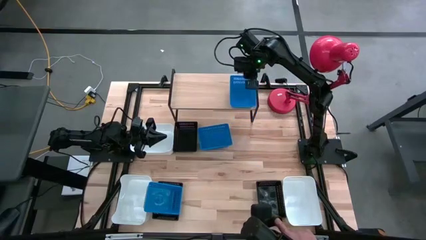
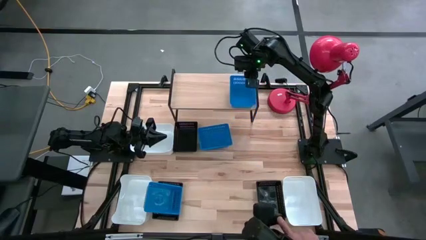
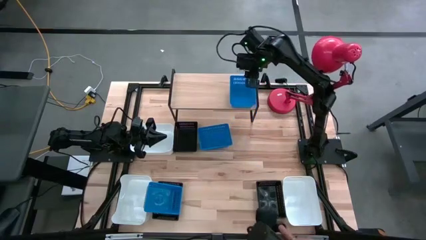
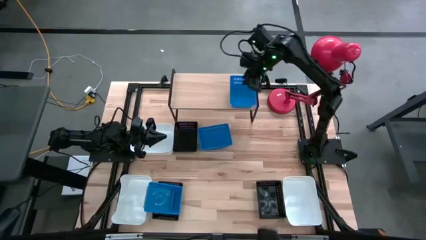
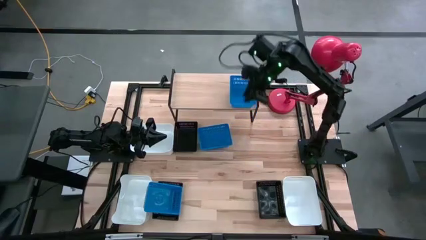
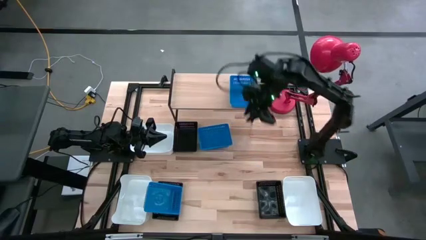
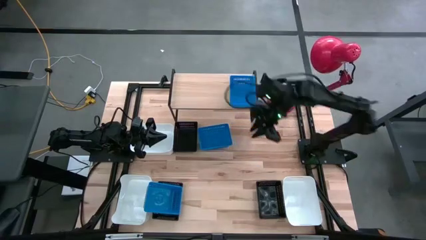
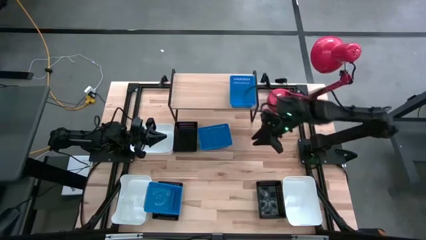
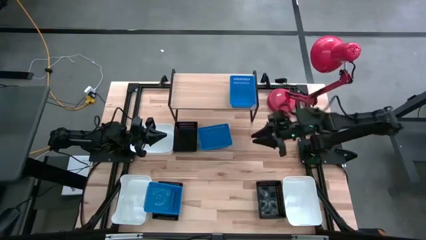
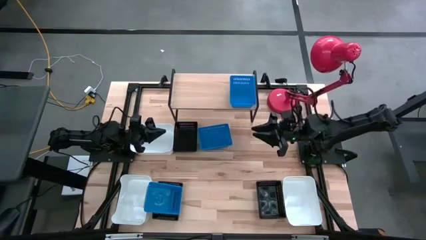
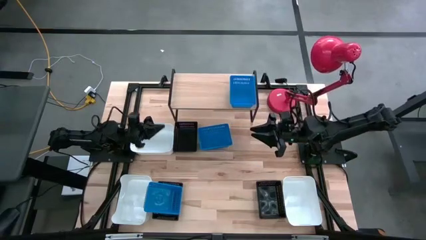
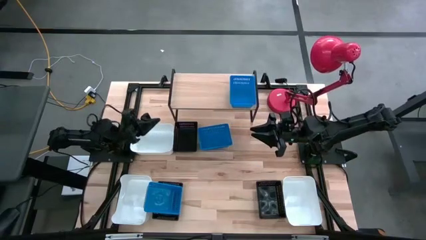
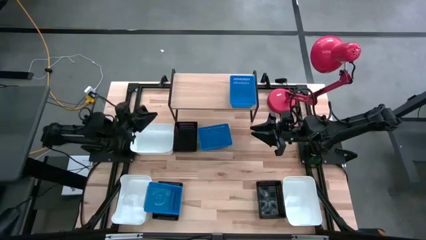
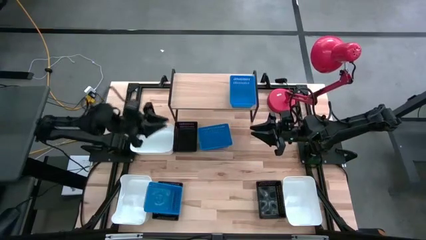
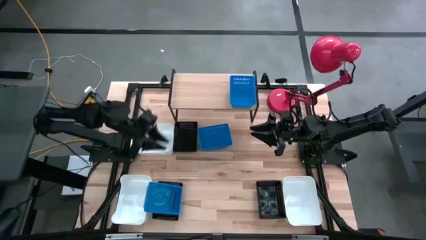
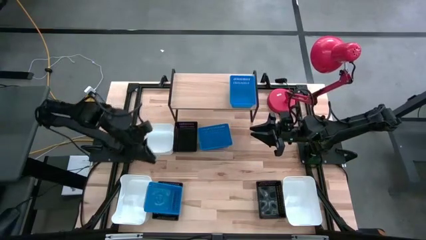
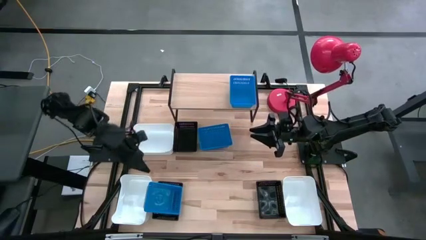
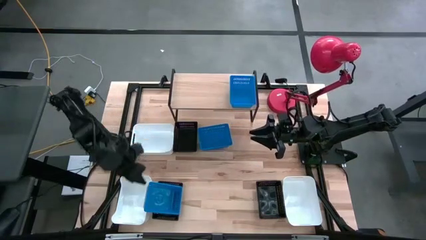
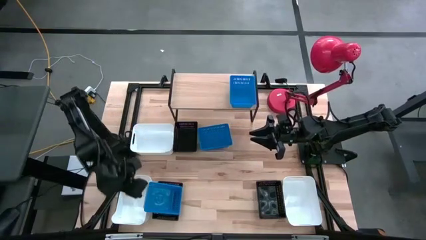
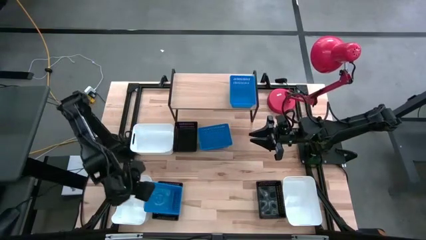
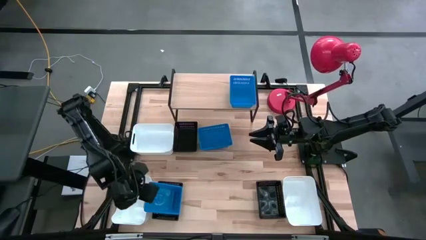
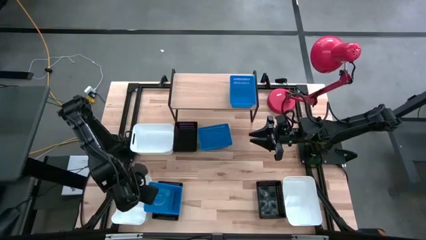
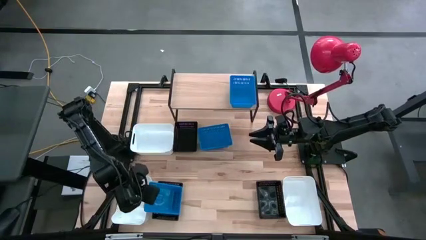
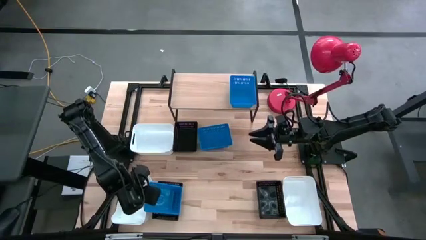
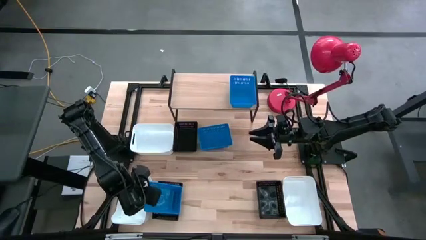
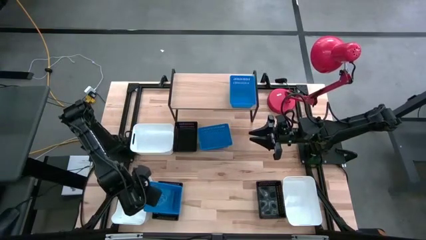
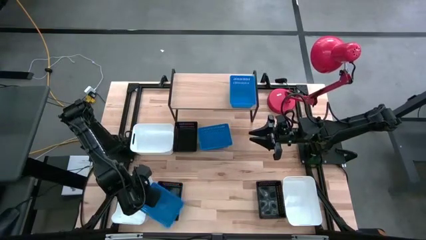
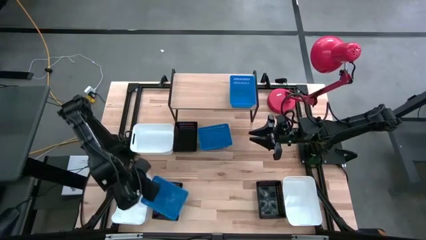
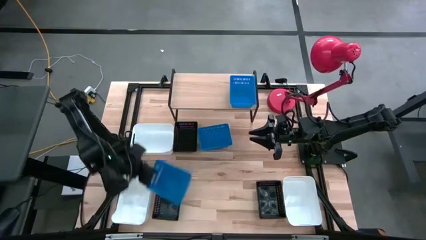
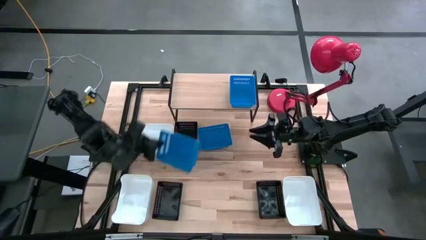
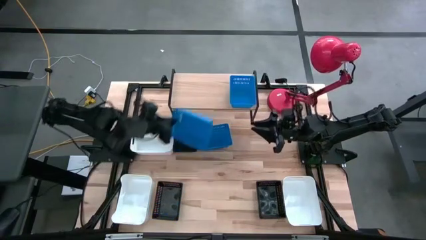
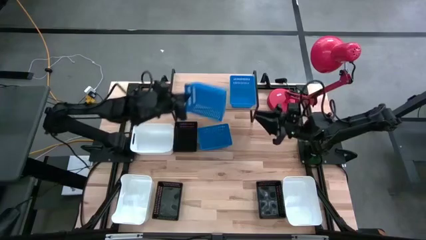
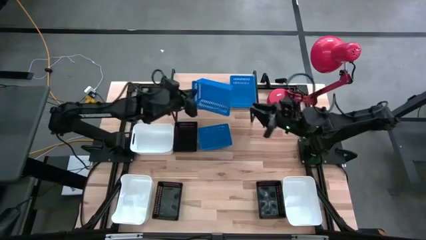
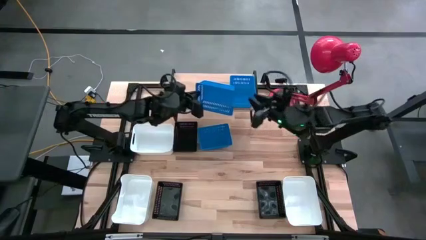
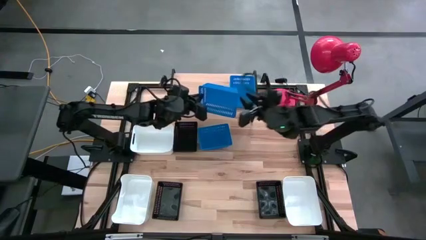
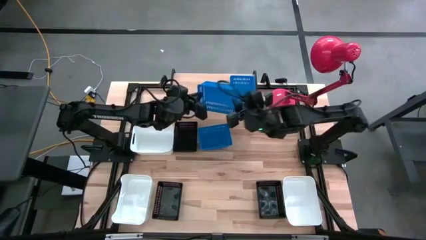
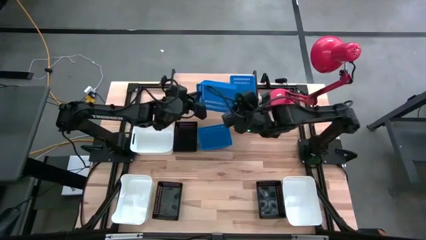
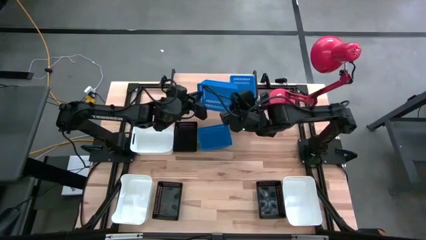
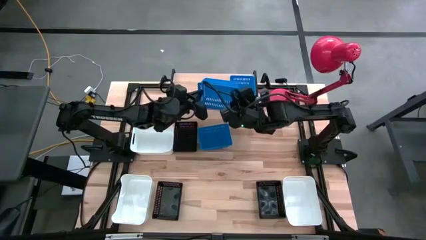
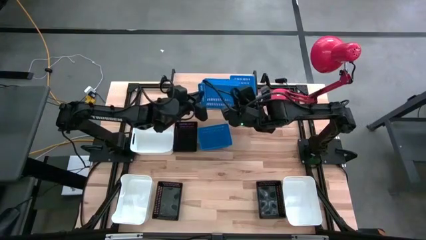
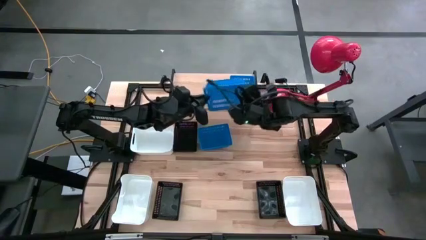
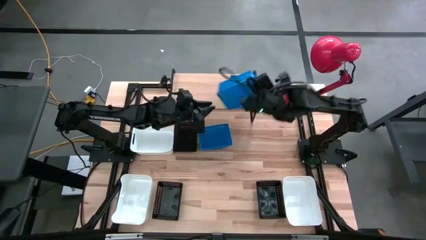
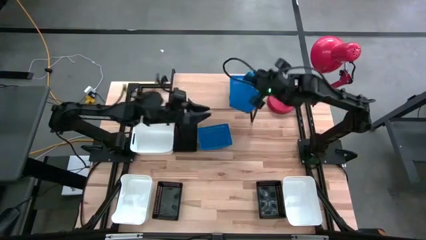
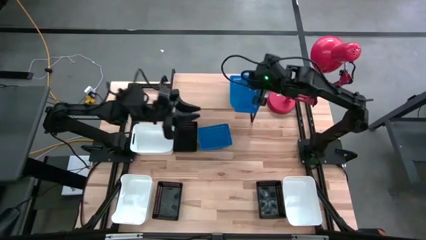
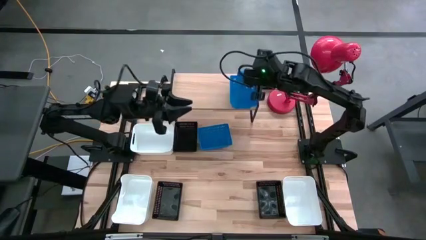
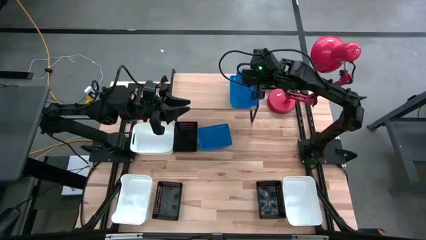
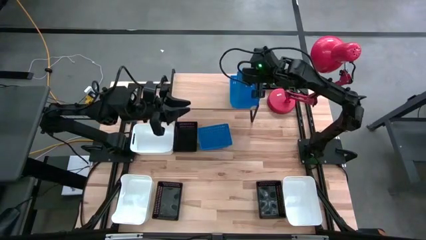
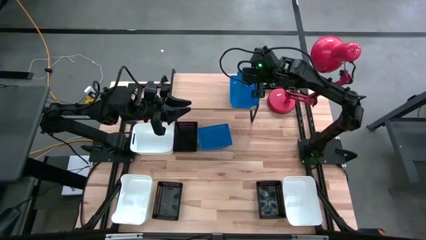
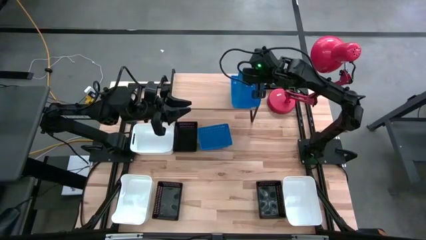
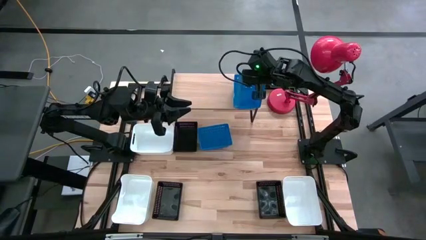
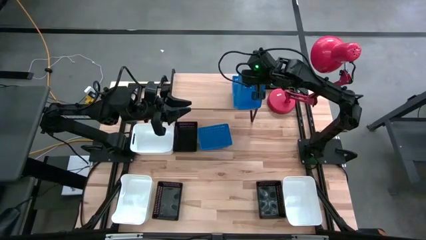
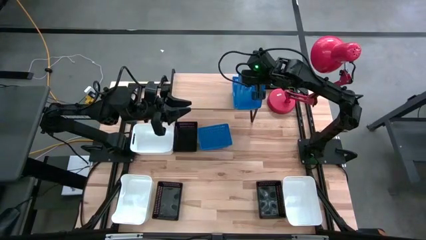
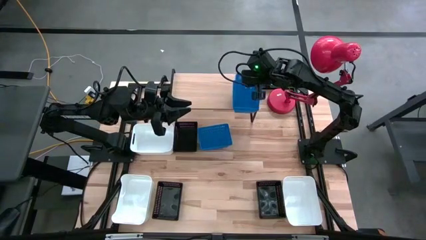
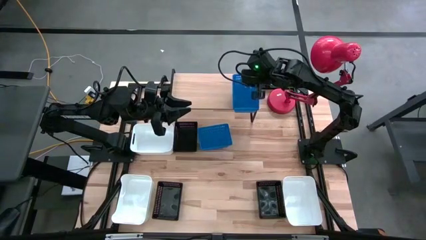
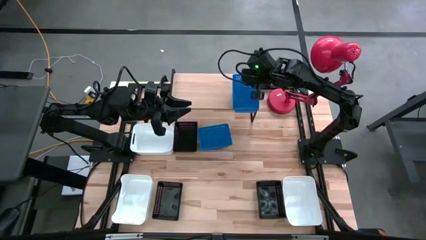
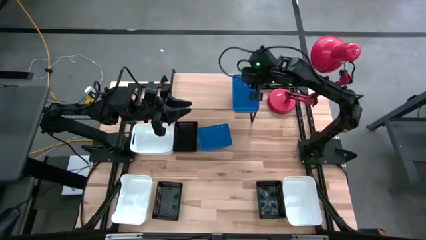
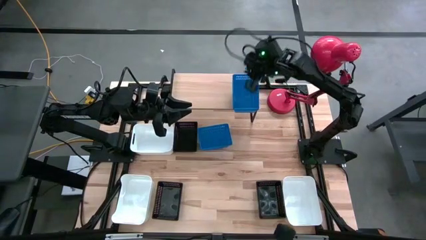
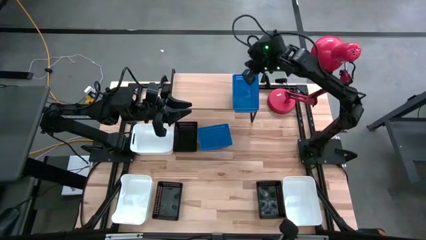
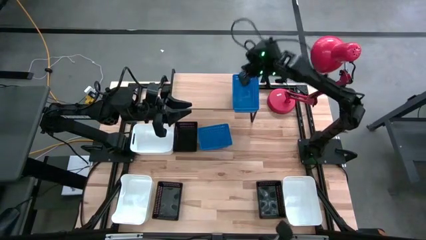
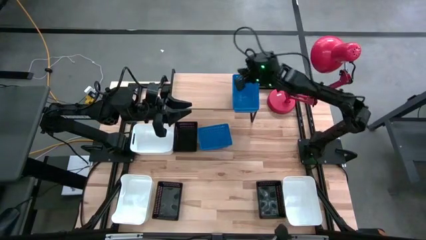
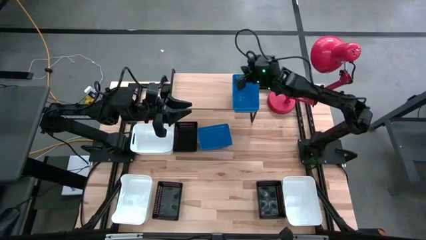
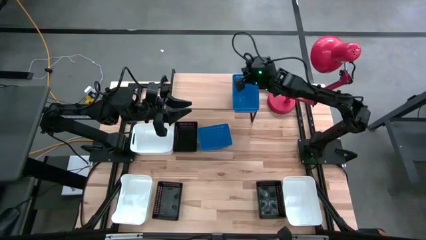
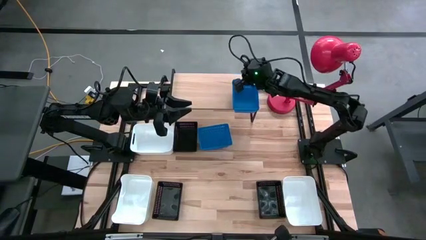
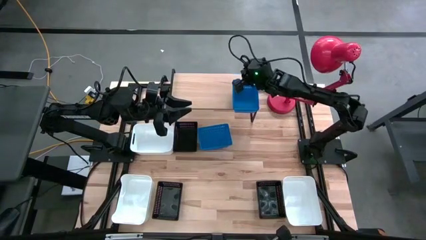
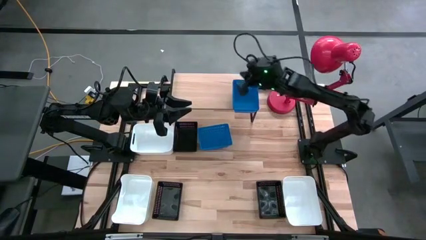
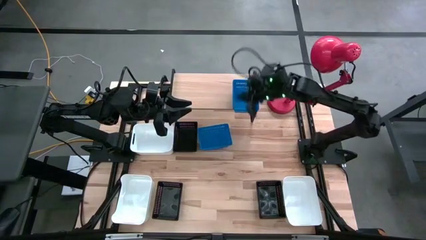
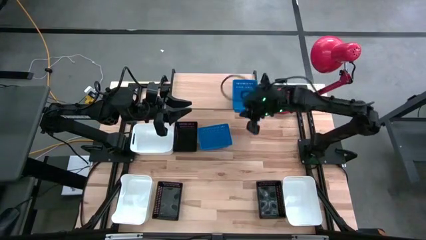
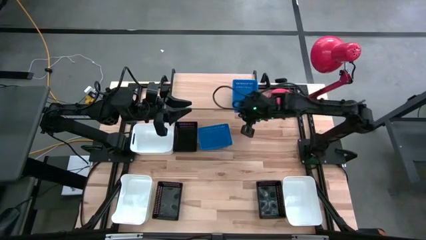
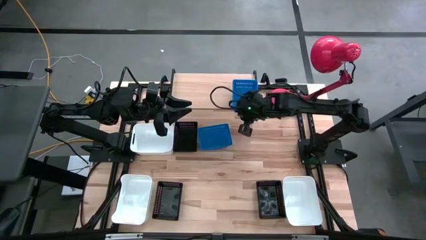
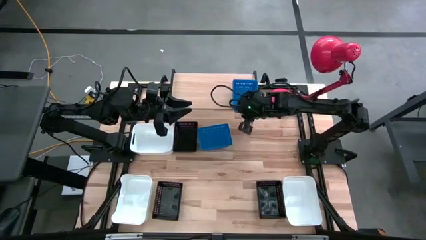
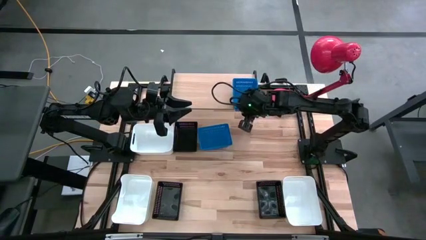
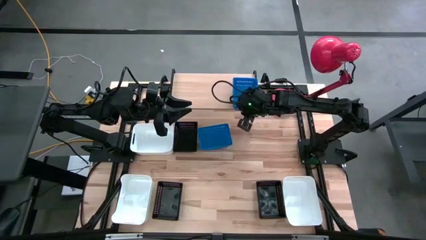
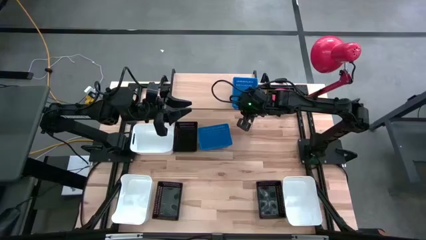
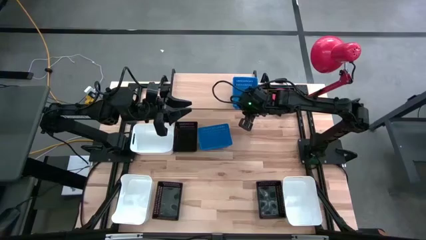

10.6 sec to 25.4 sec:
Task: Stack baskets on shelf by color
Stack the bottom left blue bin on top of the other blue bin on the shelf
